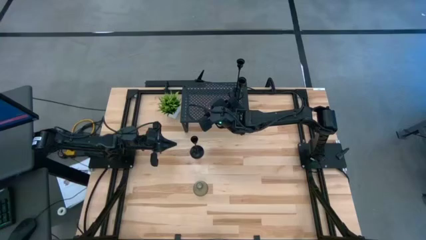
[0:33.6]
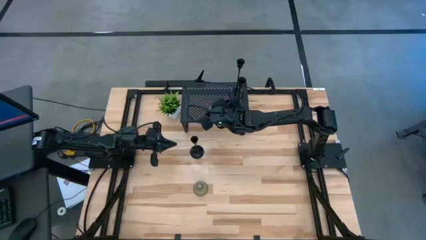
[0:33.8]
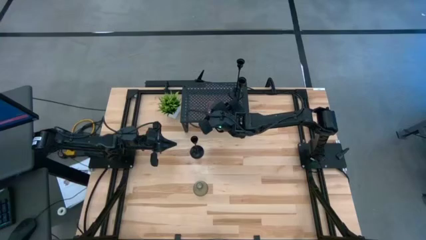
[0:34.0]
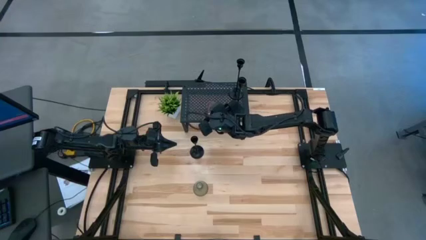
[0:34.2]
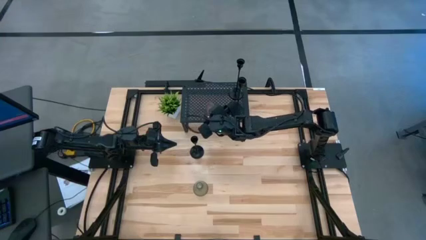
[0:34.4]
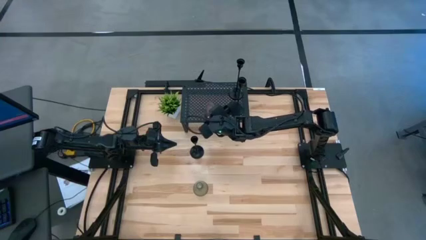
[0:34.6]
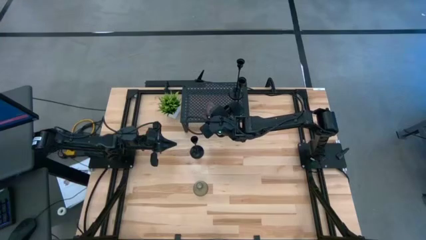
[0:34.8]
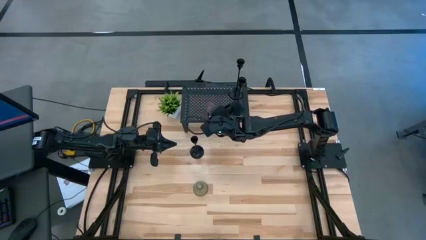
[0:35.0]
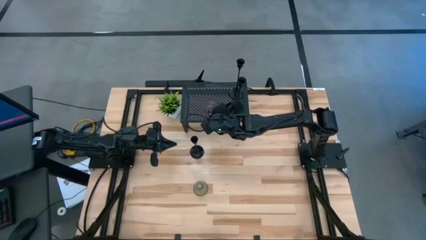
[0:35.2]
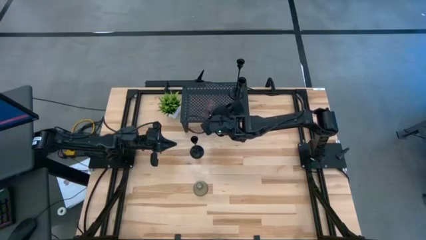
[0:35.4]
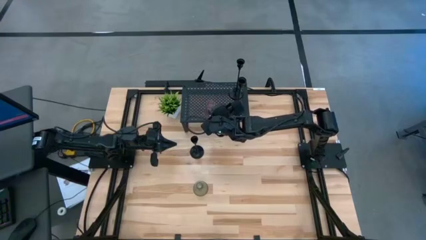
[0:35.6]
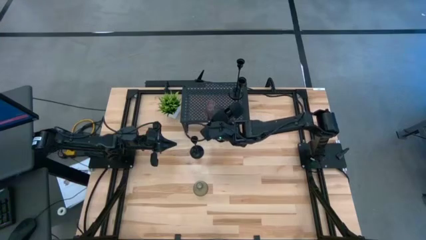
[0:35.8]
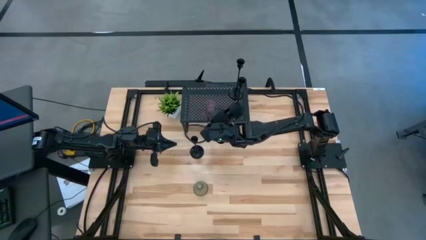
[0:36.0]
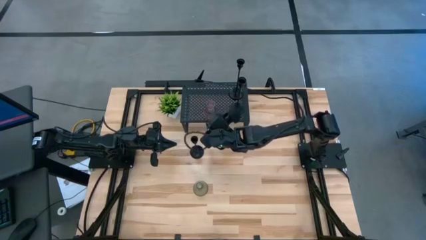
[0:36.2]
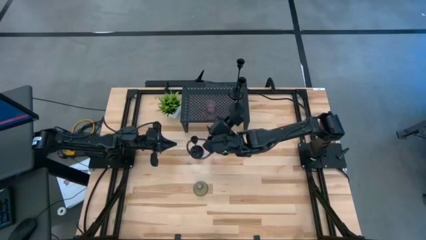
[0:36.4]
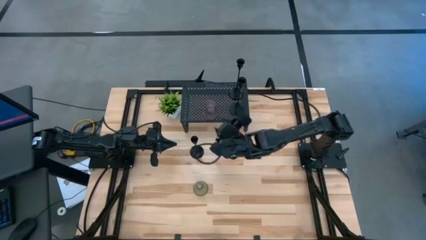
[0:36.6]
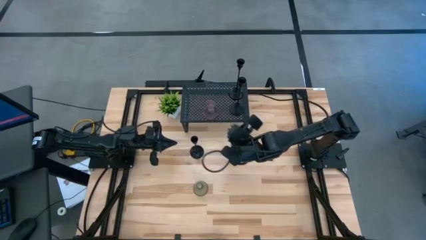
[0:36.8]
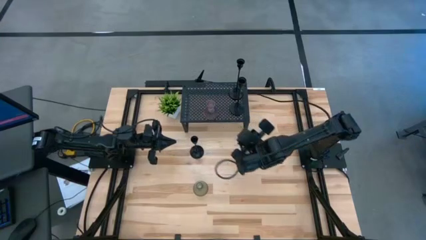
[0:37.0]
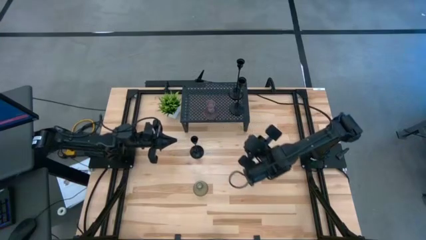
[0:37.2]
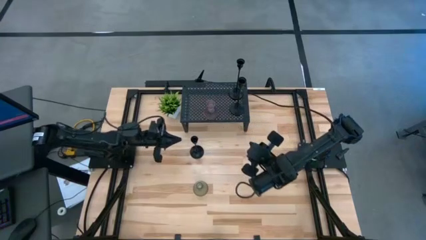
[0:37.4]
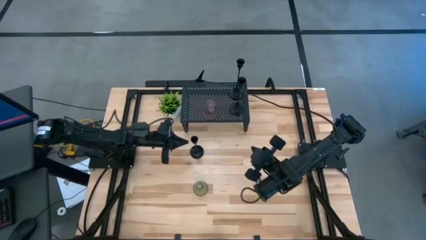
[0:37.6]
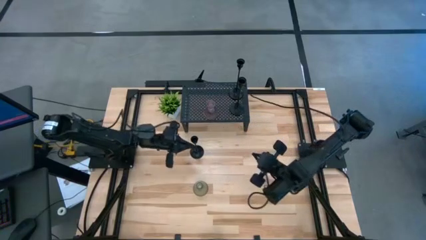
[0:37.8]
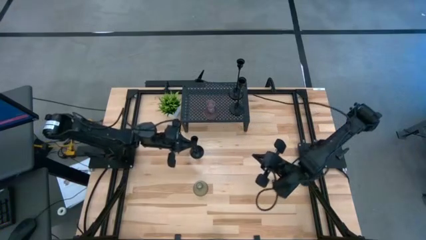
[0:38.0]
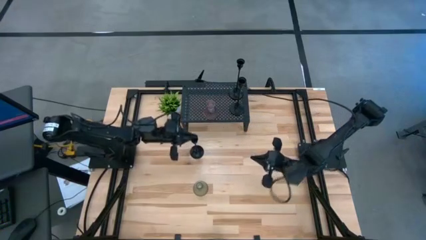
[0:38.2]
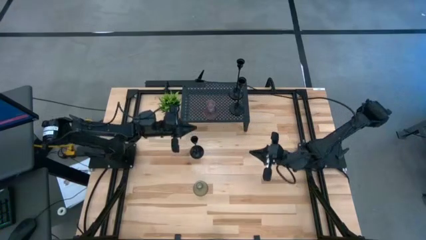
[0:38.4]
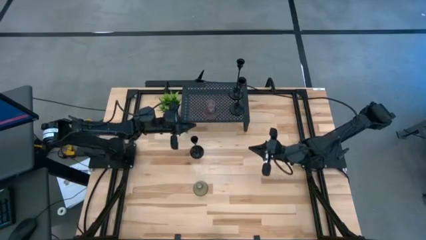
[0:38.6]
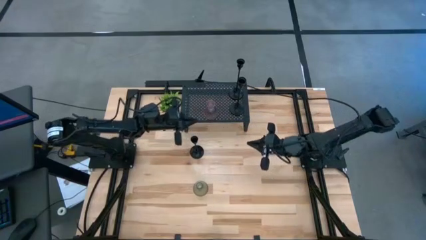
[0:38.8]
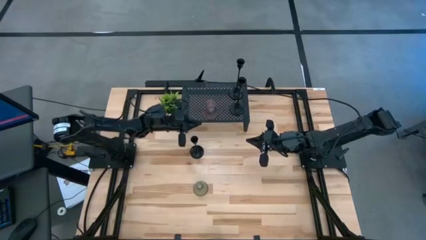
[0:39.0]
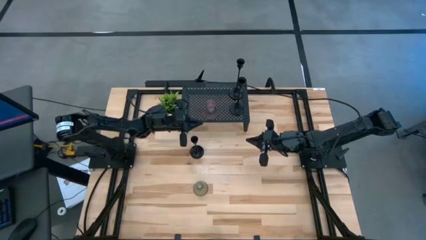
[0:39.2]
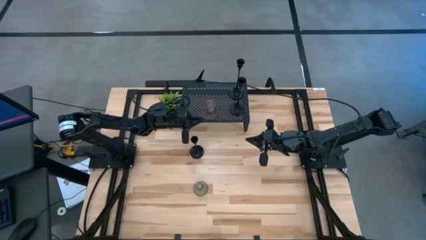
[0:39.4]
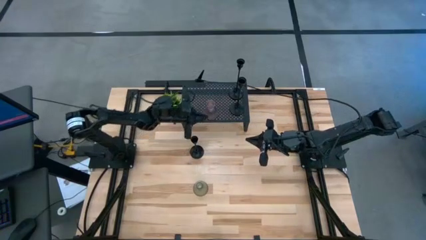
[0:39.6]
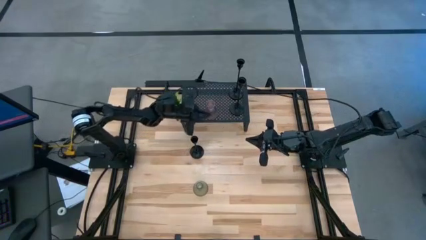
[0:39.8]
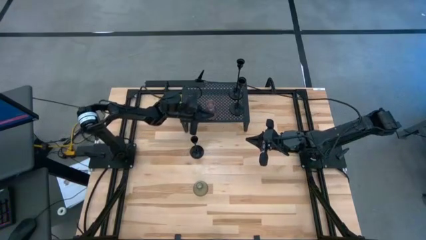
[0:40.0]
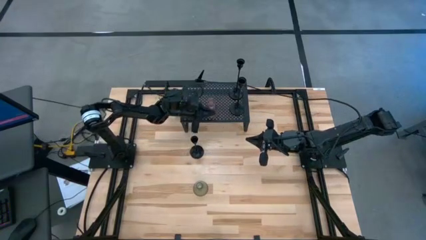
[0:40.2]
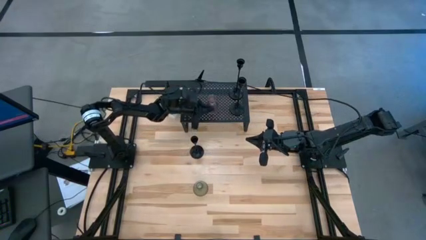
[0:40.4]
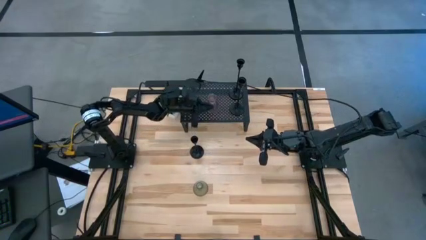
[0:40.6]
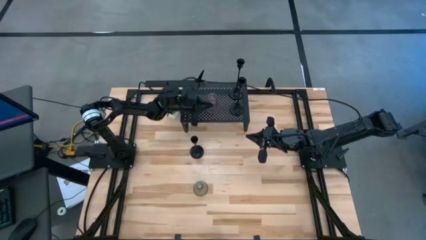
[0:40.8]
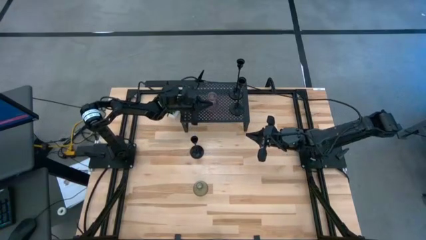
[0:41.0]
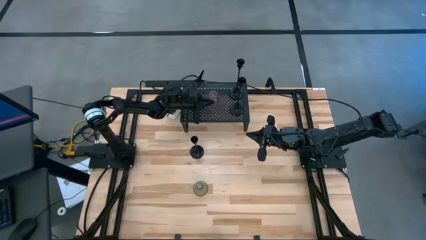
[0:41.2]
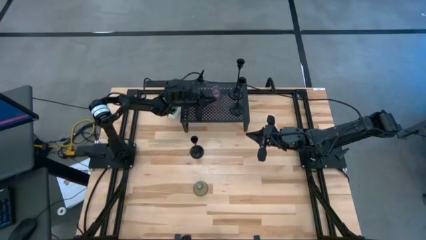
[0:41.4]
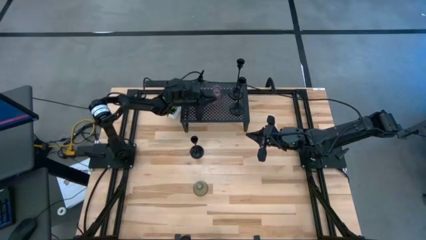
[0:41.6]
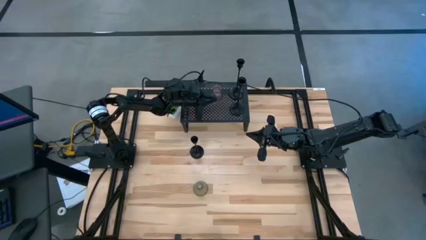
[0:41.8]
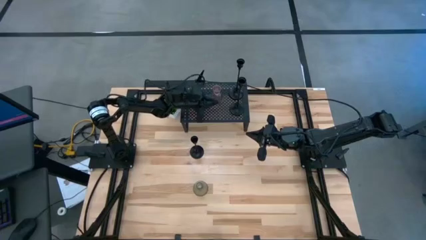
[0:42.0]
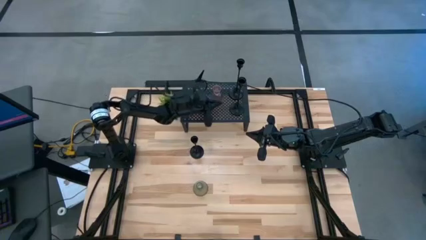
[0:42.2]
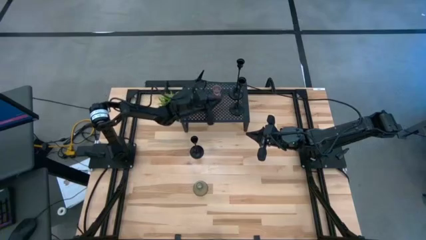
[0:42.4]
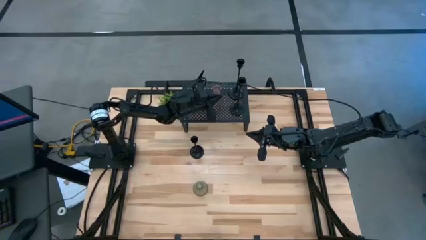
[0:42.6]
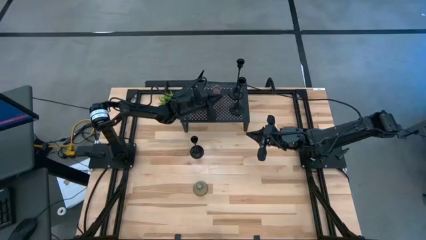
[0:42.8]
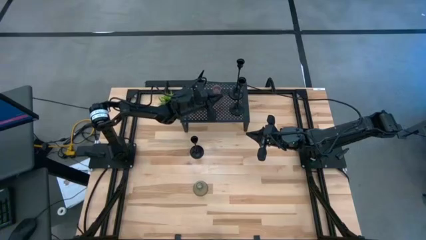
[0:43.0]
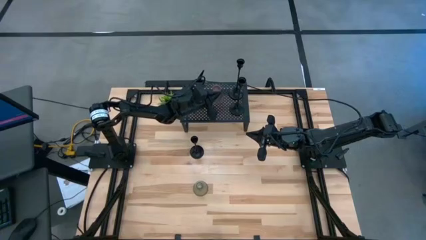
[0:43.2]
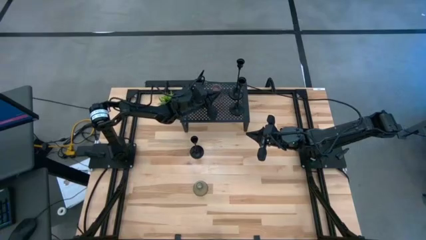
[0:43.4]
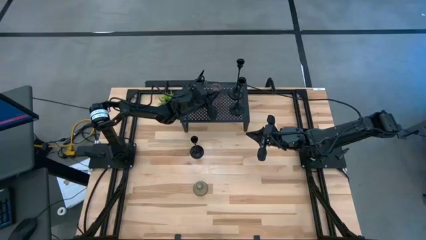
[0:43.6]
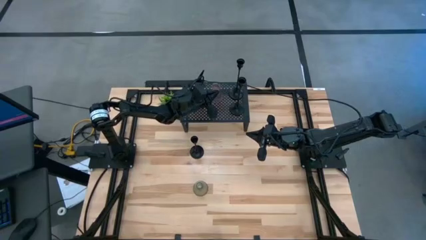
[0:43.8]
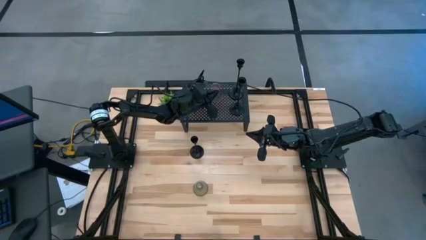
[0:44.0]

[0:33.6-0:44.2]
Task: Pick & Place candle stick holders
Put the pink glass candle holder on the shelf
